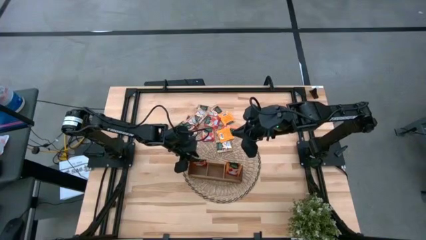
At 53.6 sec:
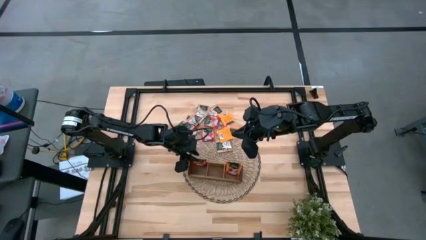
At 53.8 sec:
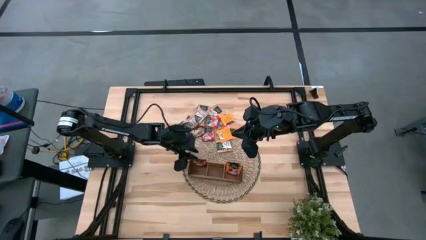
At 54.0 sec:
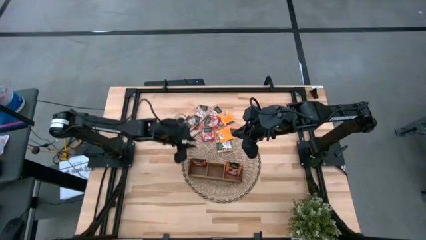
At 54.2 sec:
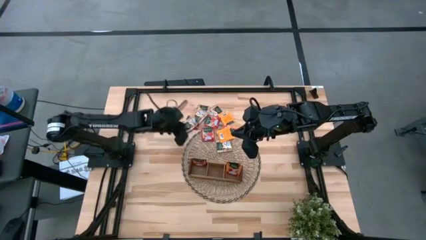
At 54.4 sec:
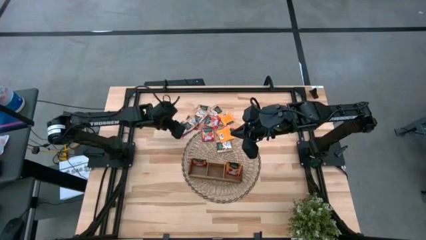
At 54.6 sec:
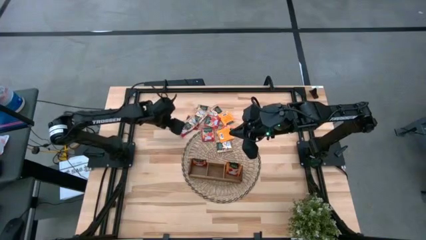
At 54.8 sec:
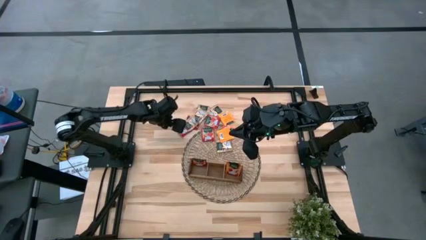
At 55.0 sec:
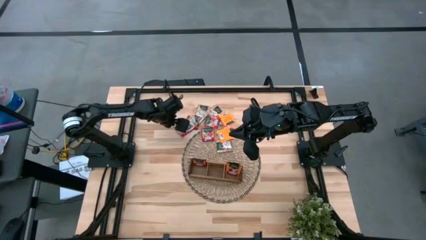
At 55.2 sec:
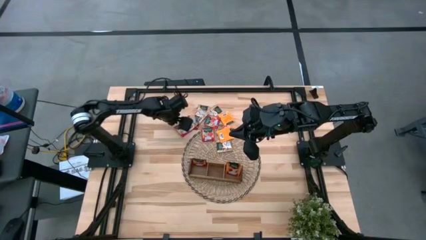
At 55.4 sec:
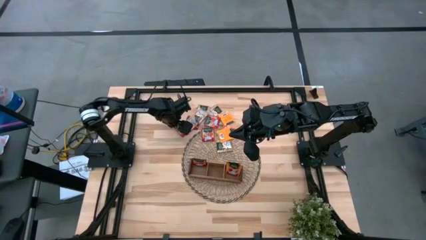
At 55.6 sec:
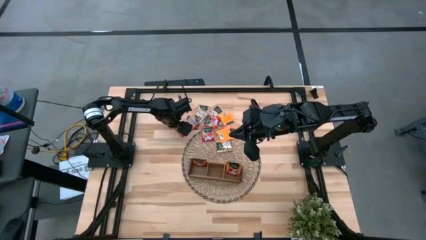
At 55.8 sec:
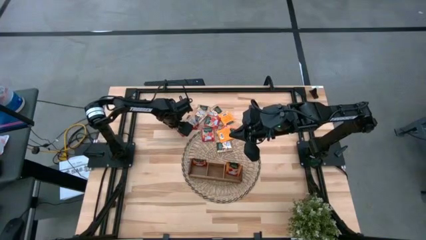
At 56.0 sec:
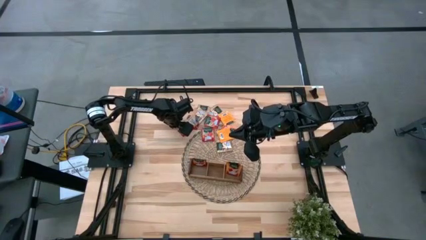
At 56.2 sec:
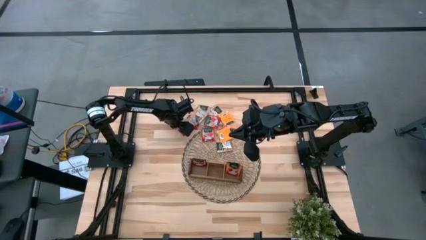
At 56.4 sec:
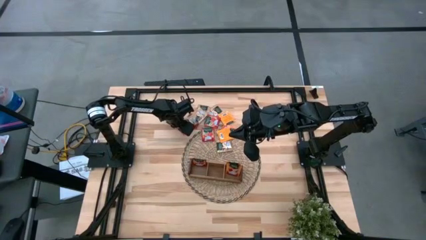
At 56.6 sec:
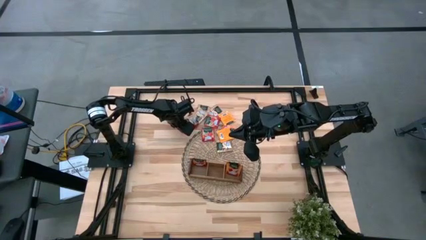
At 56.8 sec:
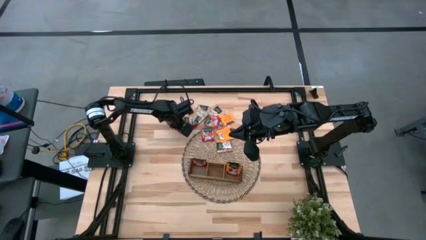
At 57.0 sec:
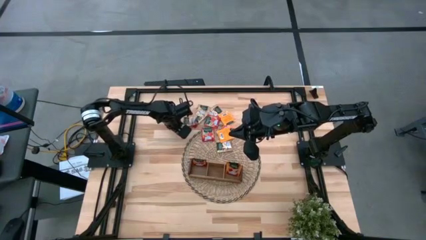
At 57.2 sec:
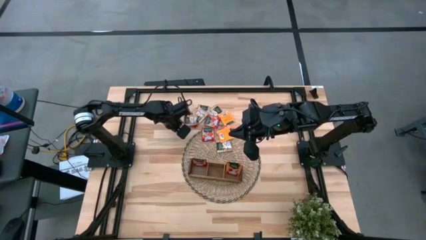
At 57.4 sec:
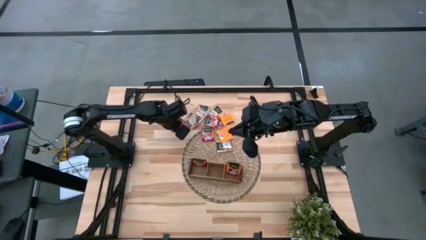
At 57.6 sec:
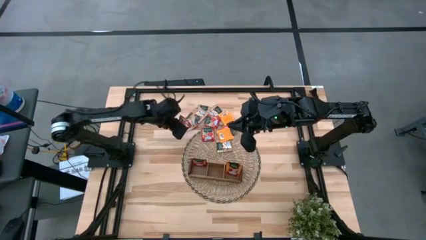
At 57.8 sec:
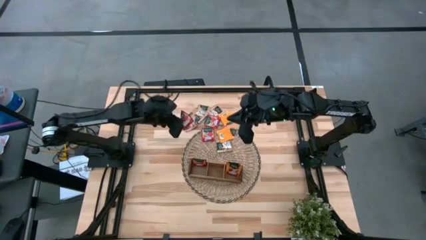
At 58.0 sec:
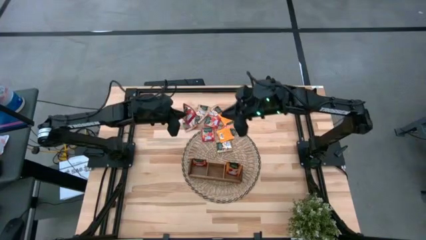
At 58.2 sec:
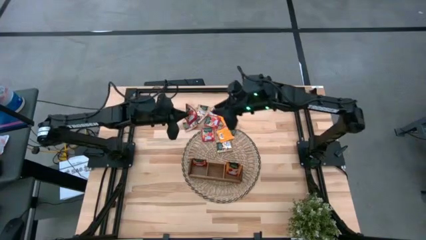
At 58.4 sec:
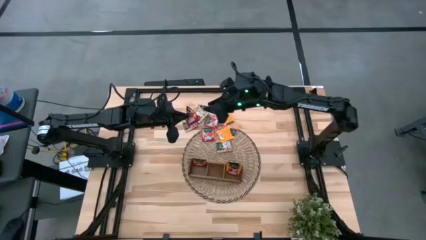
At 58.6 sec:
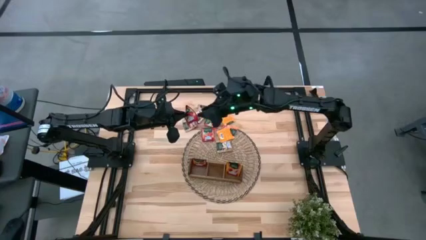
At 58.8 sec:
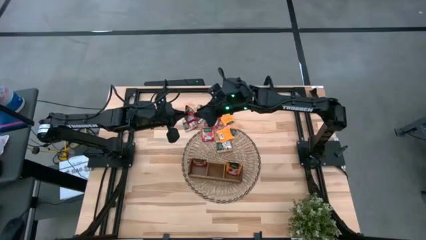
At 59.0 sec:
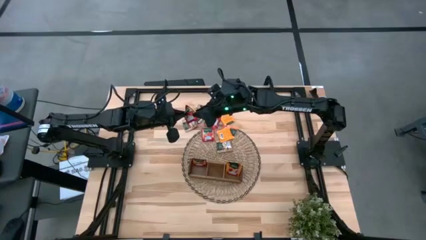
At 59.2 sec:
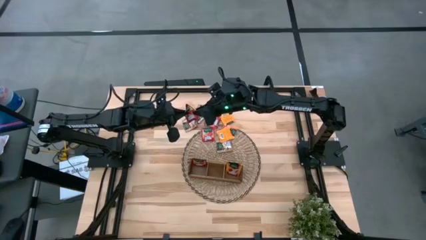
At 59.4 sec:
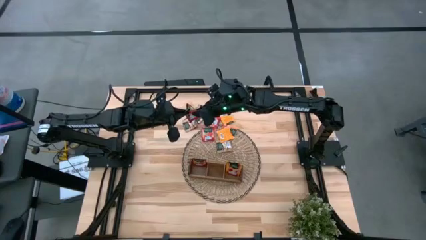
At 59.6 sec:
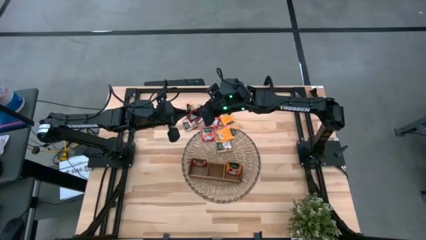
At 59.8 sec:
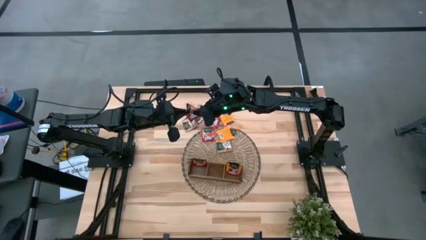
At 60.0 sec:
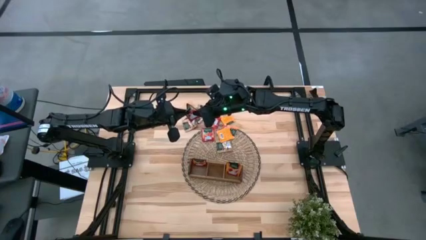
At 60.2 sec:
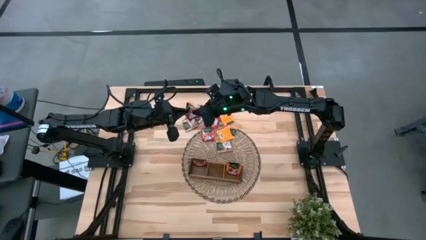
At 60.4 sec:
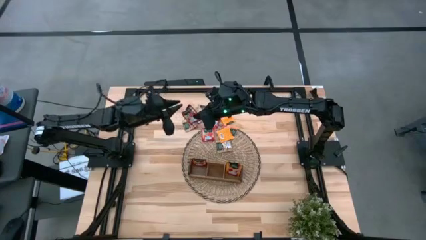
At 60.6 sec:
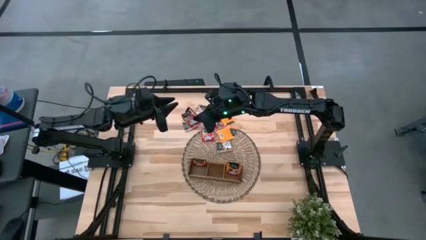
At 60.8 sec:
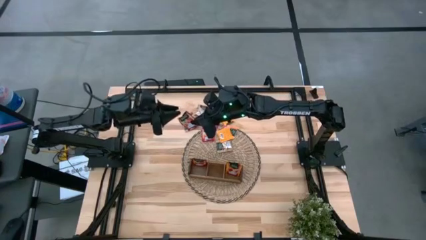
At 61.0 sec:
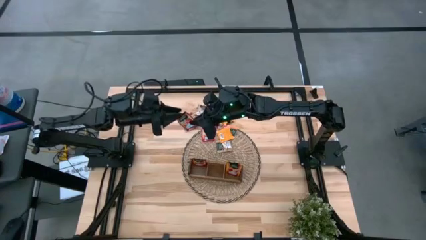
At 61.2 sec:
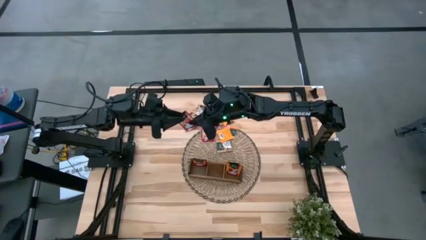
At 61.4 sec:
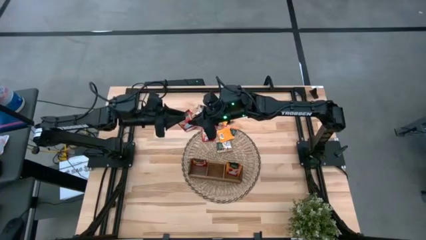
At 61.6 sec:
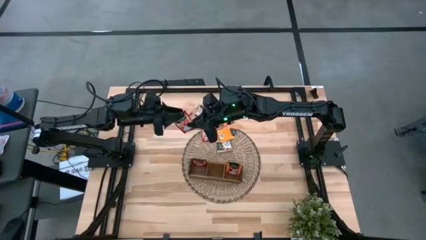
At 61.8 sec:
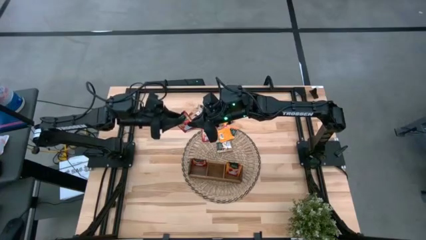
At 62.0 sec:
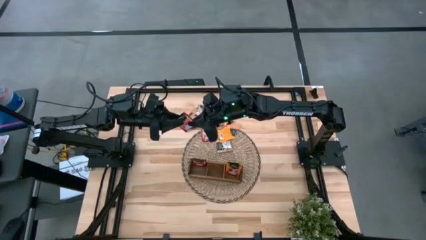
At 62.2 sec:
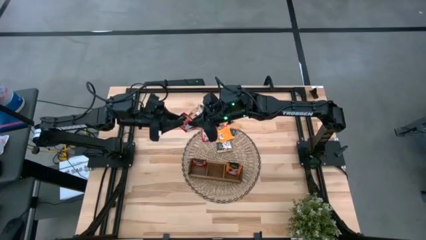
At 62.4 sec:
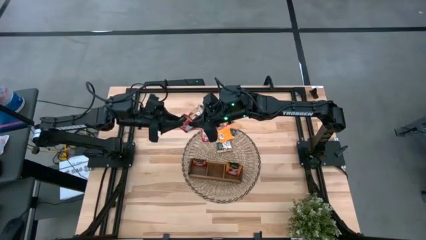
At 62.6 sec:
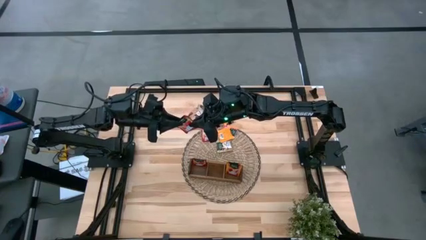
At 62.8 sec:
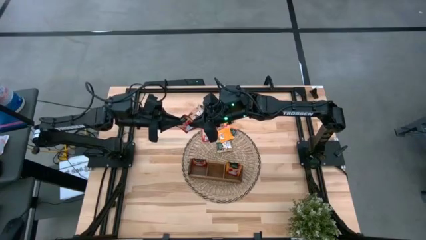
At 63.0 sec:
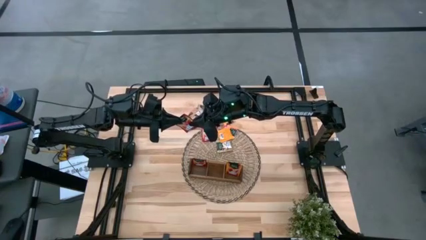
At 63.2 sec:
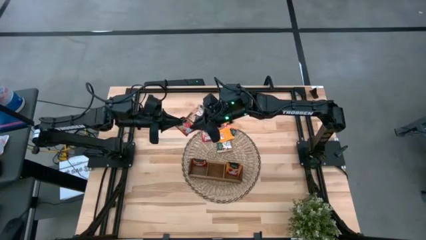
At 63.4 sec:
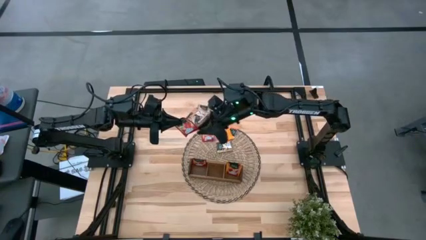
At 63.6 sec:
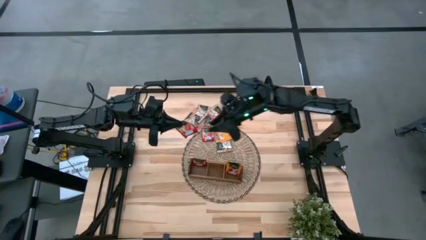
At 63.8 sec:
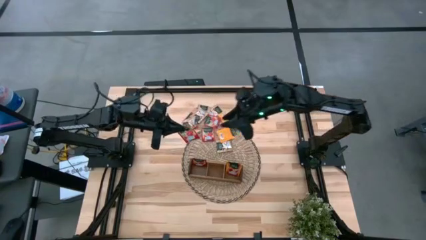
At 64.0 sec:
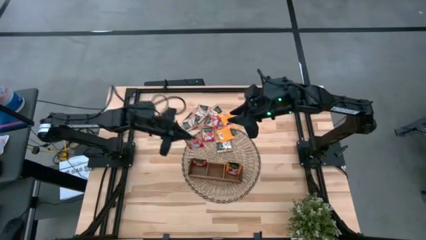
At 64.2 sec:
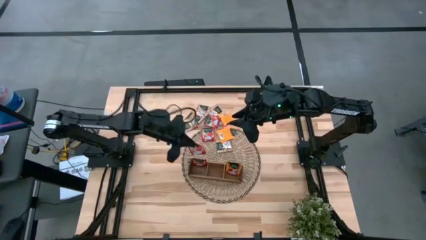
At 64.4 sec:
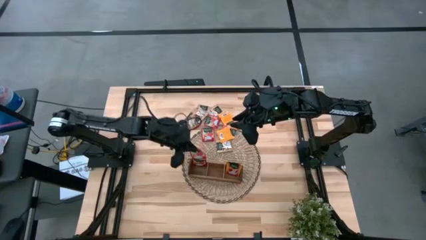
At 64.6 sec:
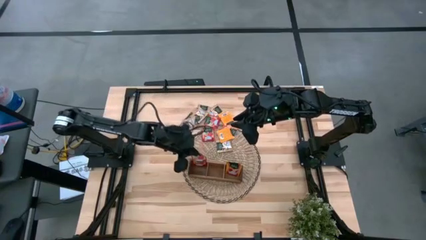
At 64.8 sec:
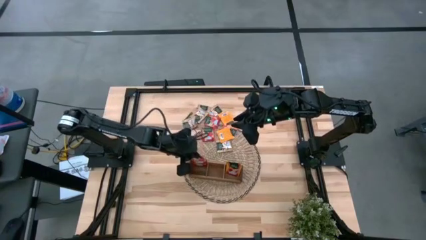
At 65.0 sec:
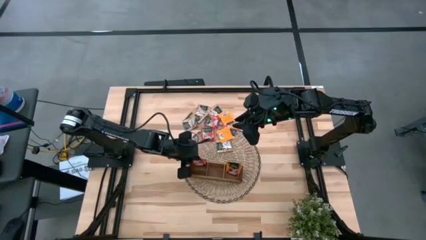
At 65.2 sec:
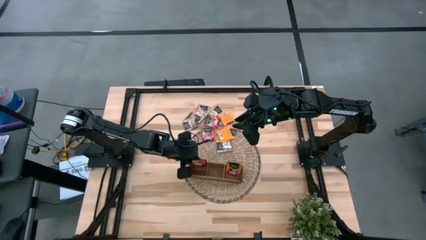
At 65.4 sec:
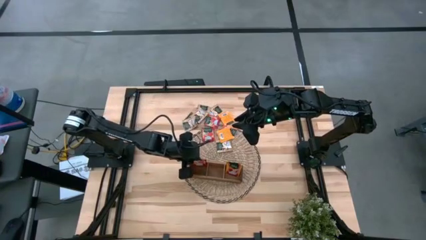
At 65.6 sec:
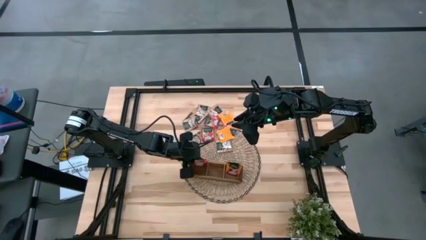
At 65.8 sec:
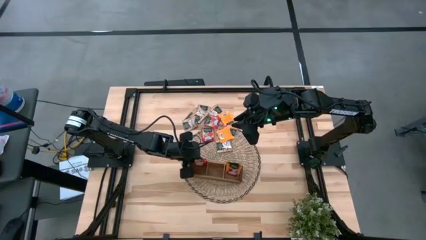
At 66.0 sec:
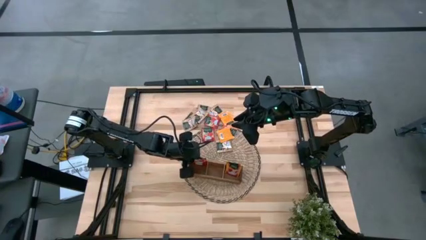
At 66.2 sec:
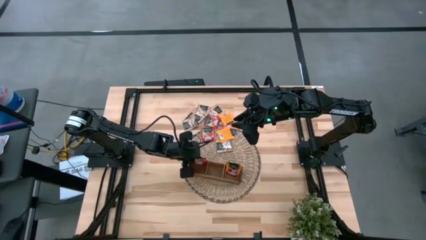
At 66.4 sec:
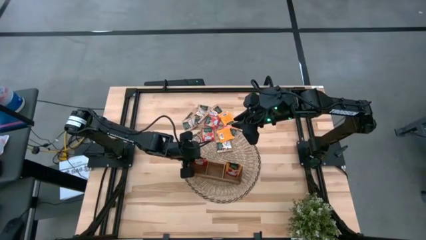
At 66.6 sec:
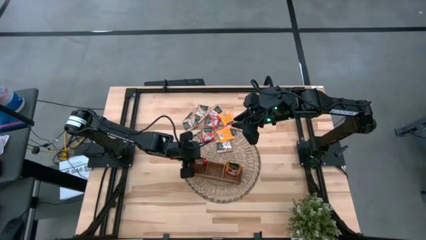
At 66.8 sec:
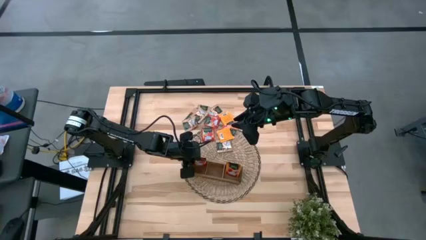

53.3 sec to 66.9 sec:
Task: Pick & Place Tea
Put the red tea bag into the left section of the wooden organizer

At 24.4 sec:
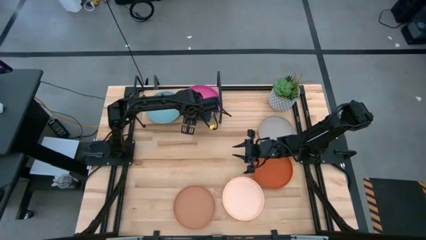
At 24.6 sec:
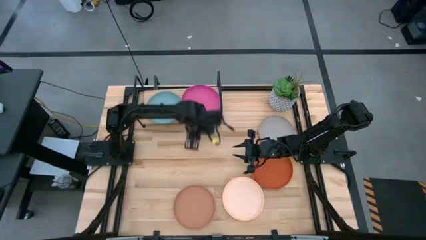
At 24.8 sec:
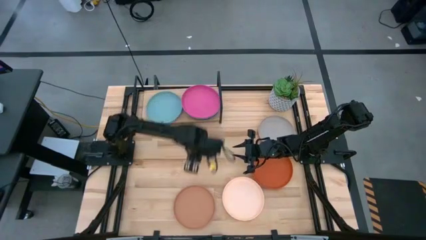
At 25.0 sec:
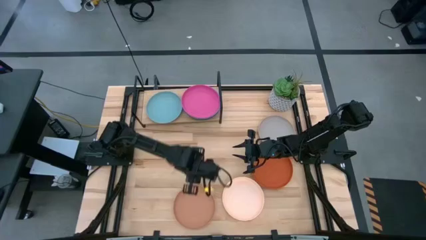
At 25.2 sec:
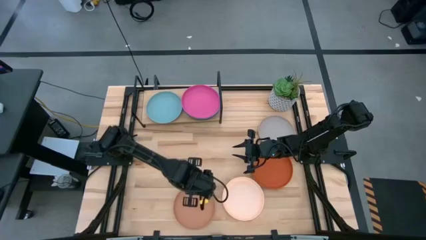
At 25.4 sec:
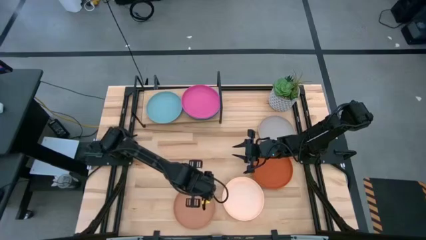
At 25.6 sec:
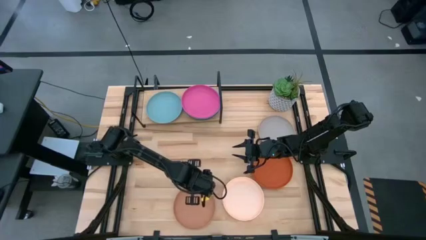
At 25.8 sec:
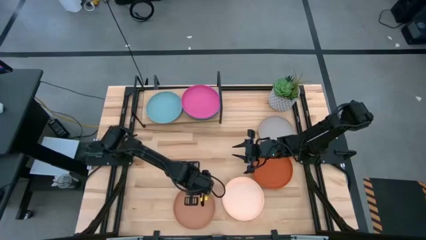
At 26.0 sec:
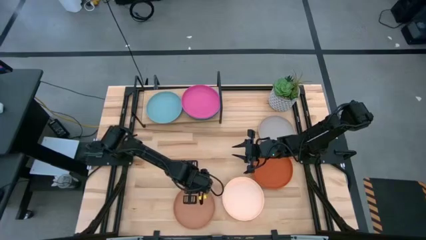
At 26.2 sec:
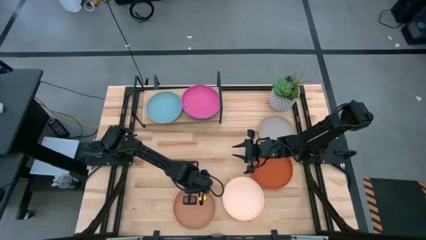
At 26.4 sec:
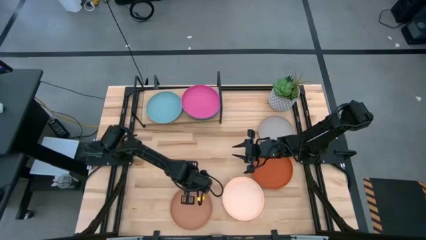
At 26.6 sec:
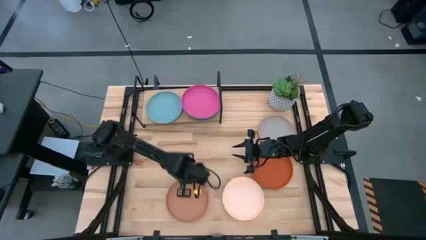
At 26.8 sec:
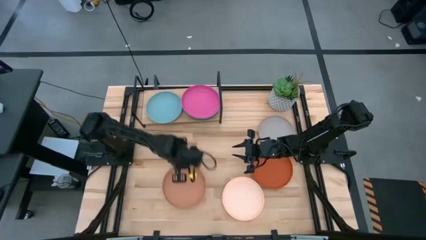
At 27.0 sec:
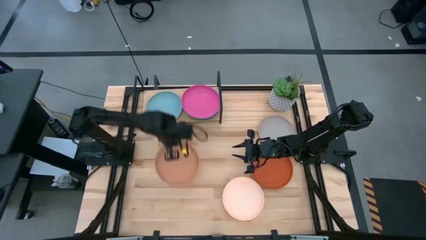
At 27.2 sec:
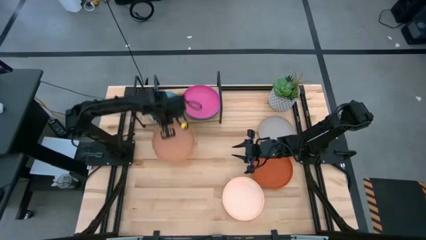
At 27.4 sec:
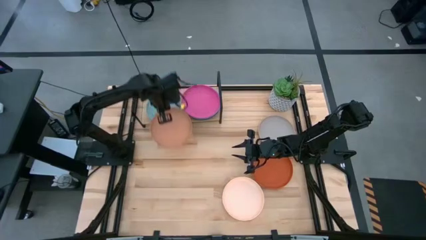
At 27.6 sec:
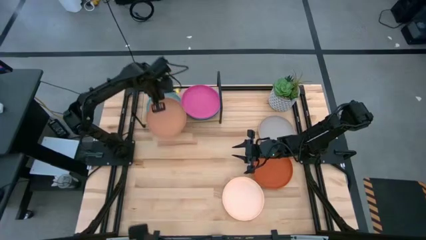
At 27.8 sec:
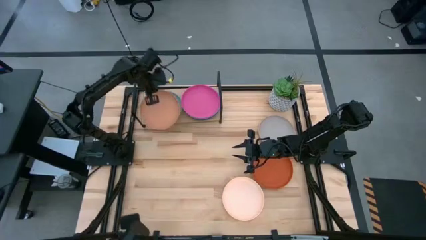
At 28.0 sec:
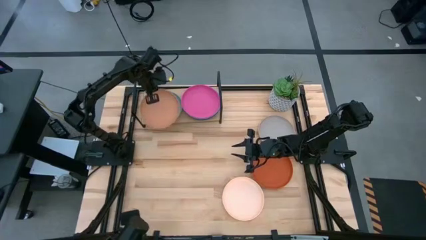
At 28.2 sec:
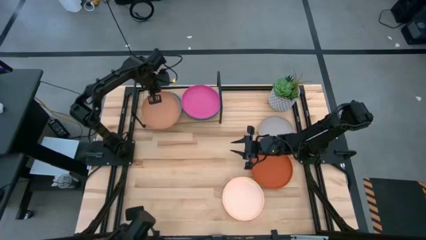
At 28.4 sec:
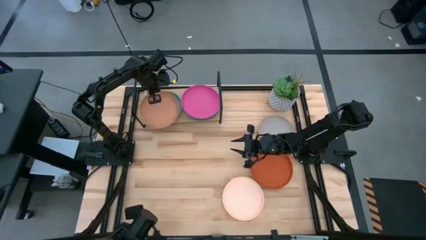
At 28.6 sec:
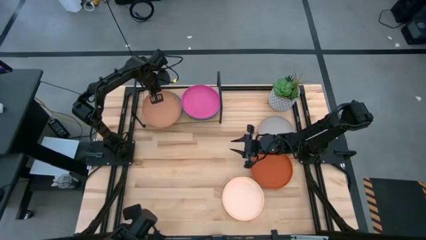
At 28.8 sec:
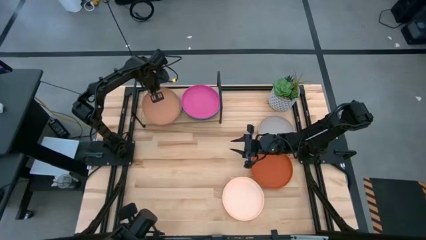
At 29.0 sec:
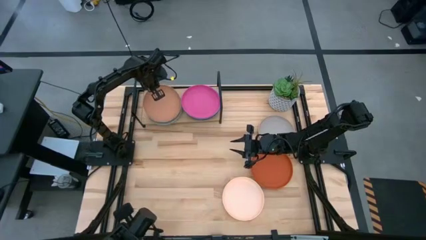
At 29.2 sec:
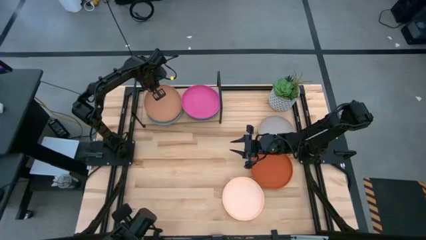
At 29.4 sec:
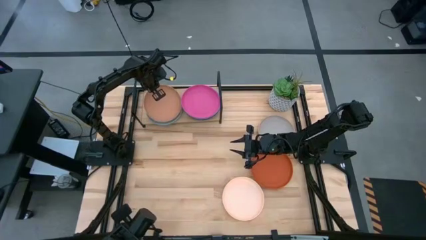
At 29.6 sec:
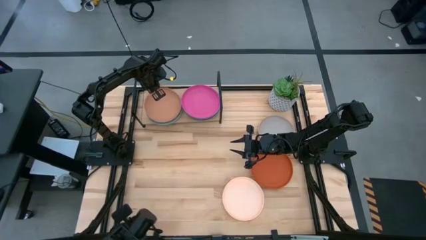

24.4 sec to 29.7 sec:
Task: Place and stack plates onto a shelf
Stack the brown plate on top of the light blue plate on the shelf
